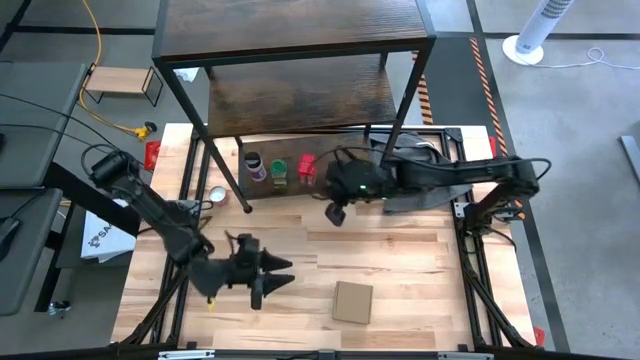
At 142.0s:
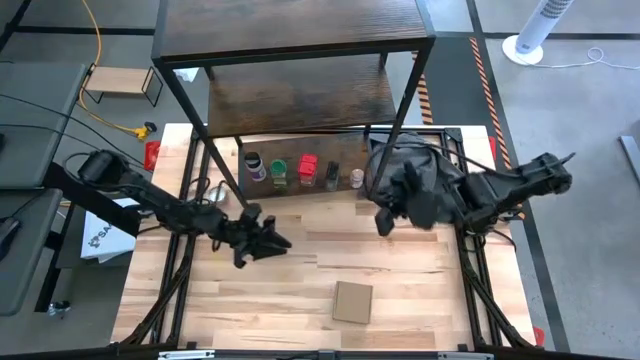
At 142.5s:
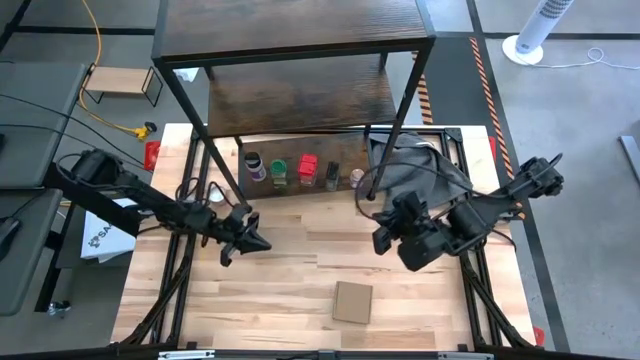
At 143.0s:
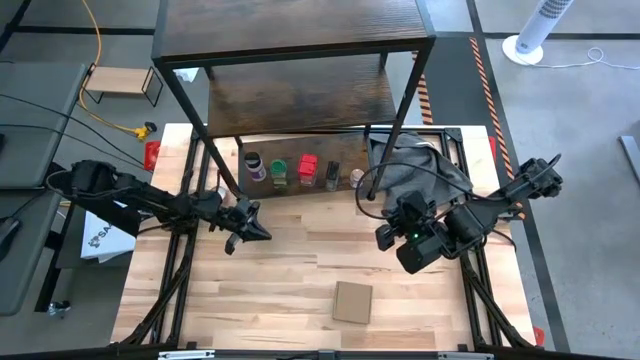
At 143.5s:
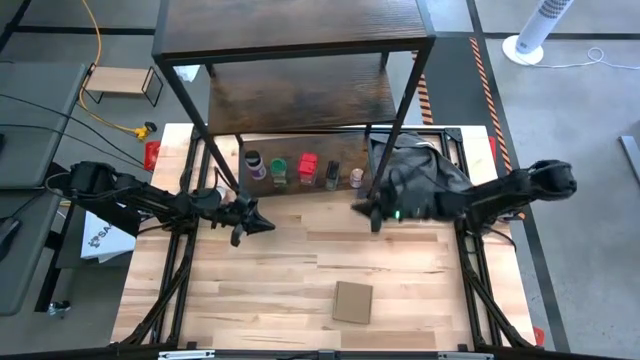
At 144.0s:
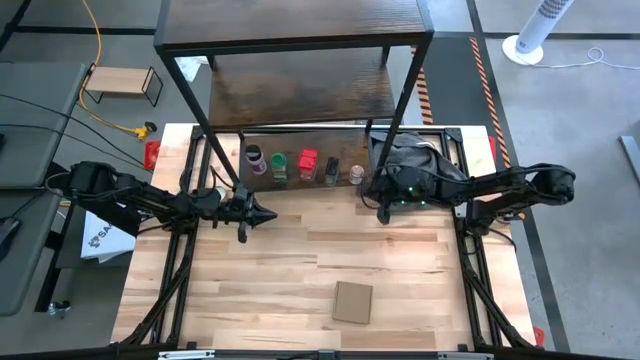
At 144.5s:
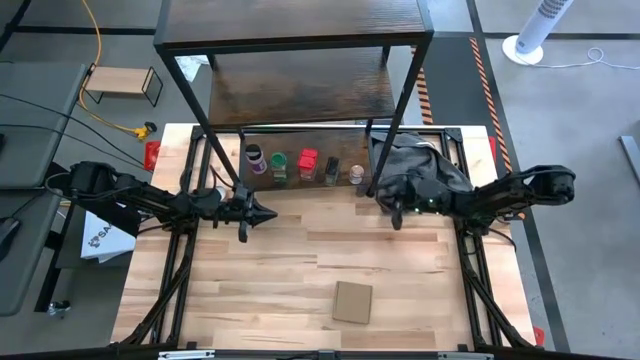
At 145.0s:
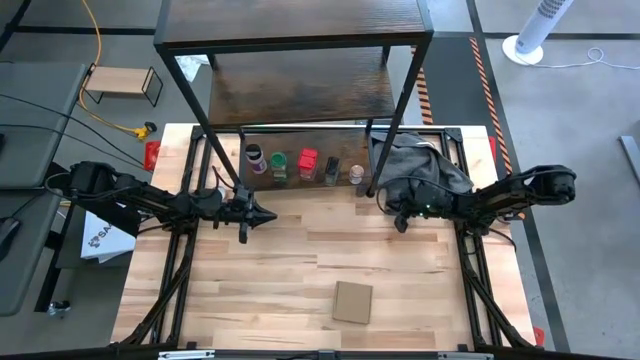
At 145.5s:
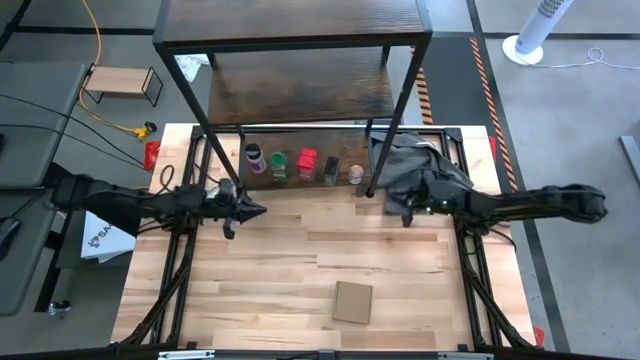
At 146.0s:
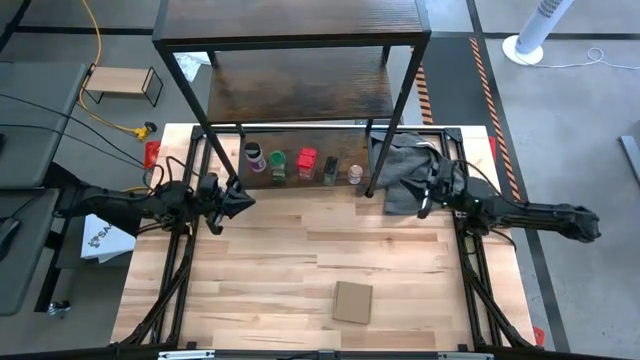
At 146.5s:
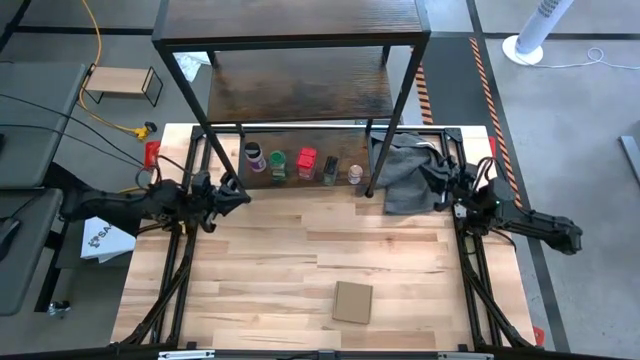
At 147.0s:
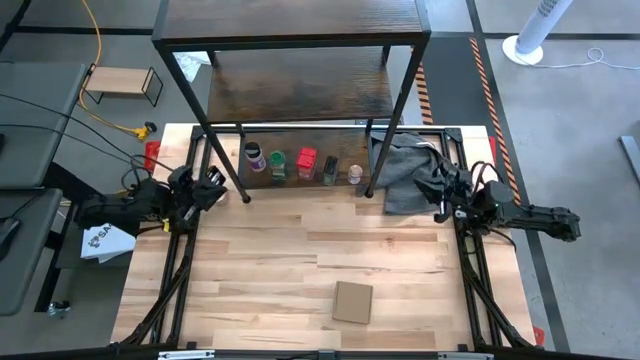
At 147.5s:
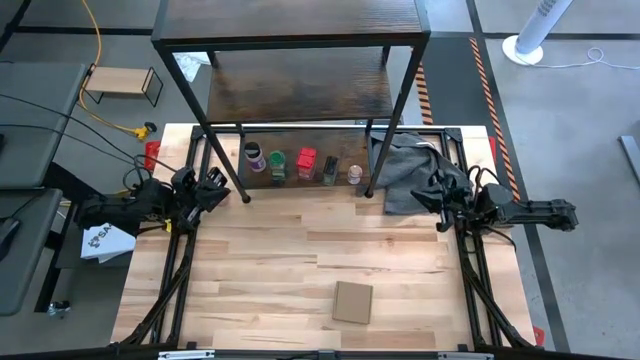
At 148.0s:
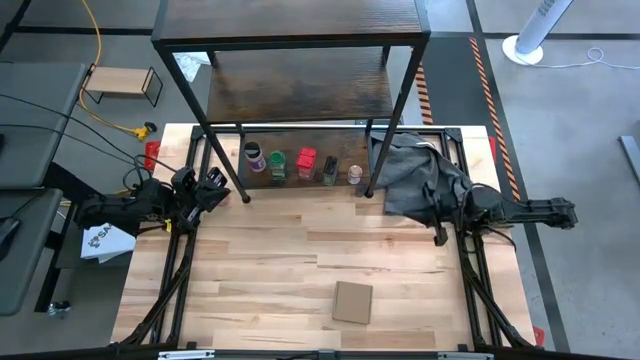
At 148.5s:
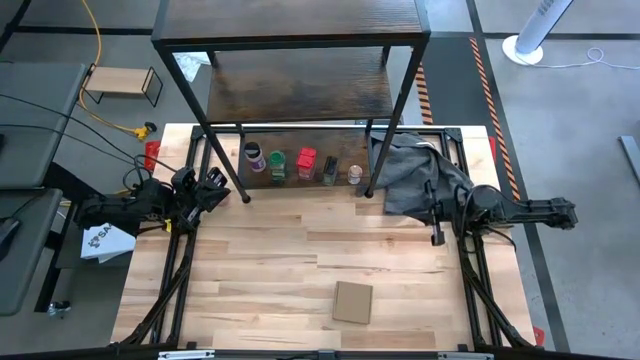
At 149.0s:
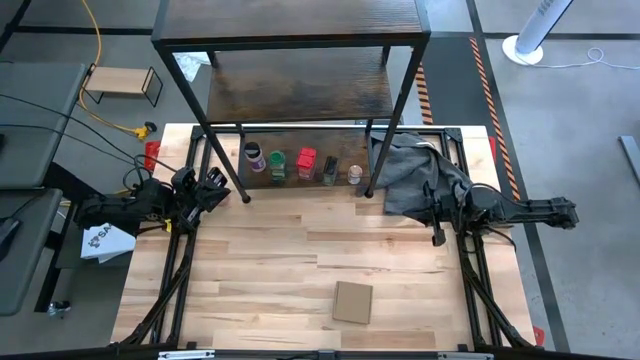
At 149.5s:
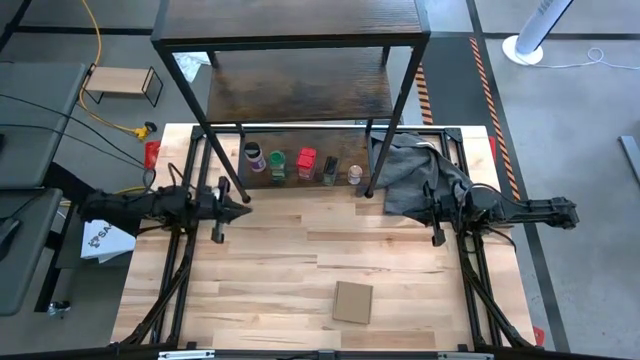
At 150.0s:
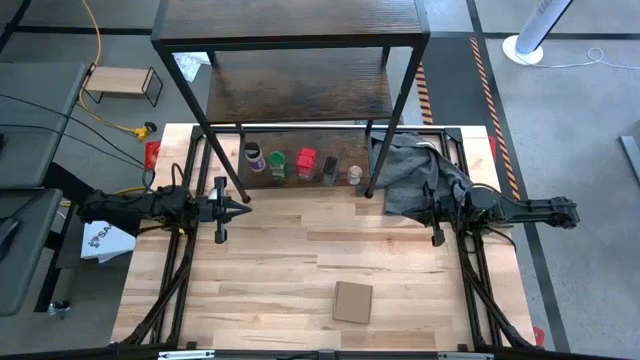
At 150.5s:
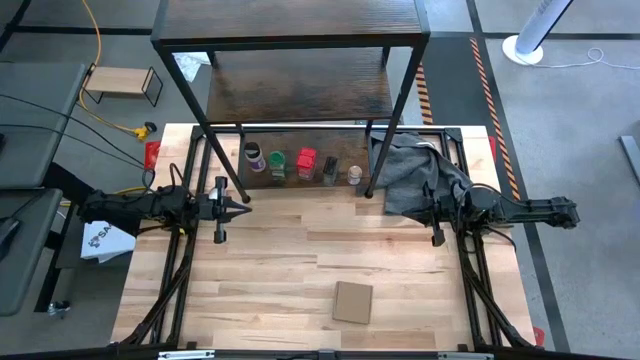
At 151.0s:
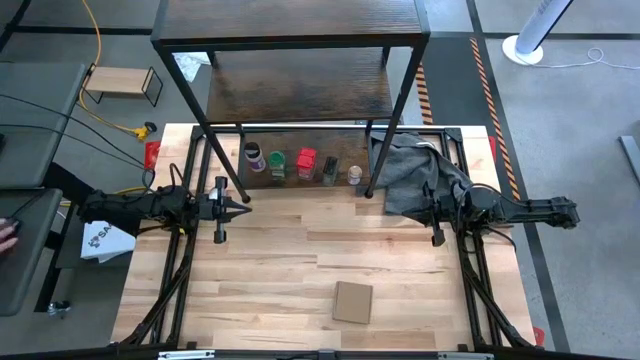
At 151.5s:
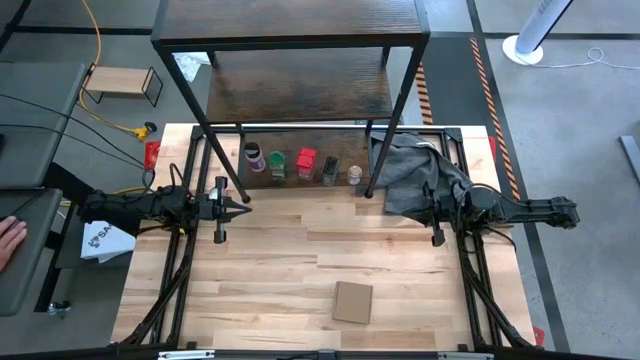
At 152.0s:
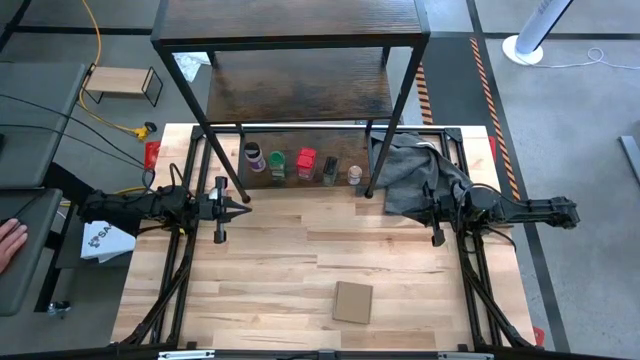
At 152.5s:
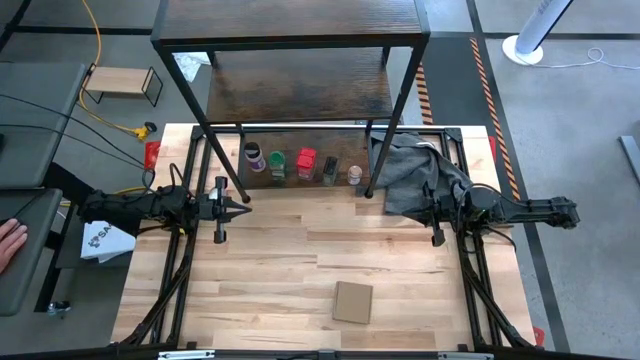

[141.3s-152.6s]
Task: Shelf spices
Return to Home Position

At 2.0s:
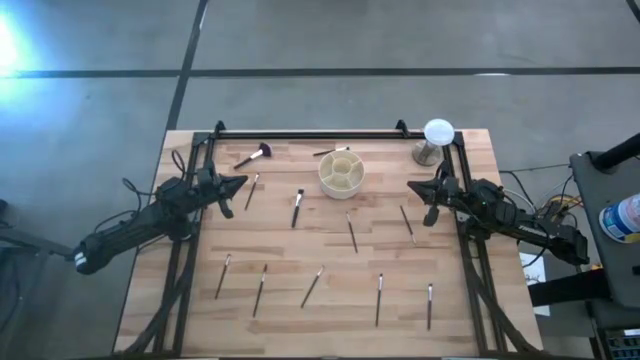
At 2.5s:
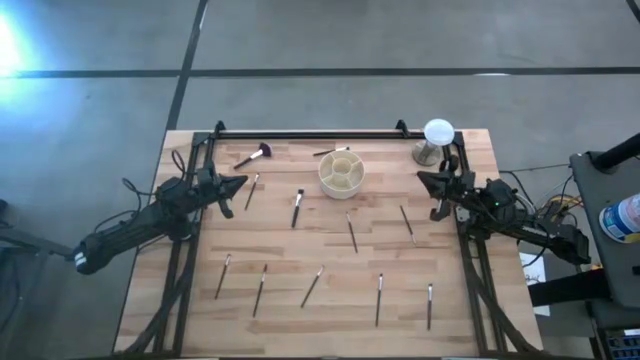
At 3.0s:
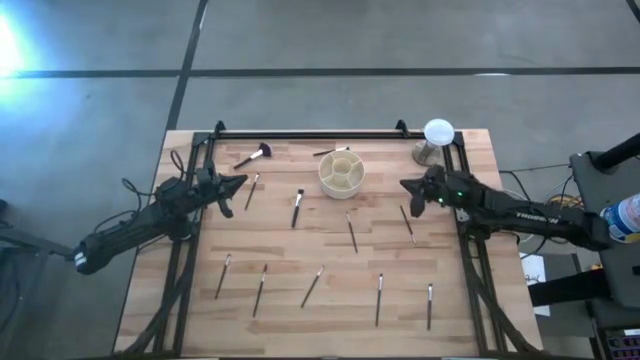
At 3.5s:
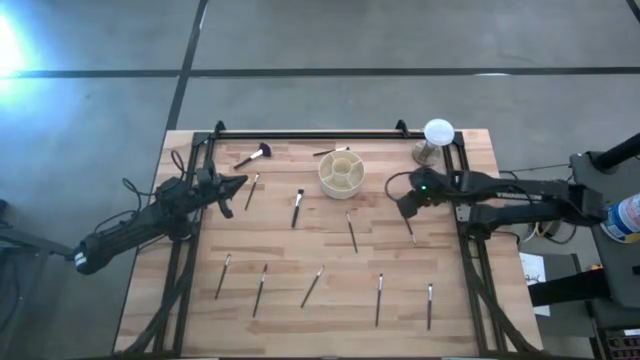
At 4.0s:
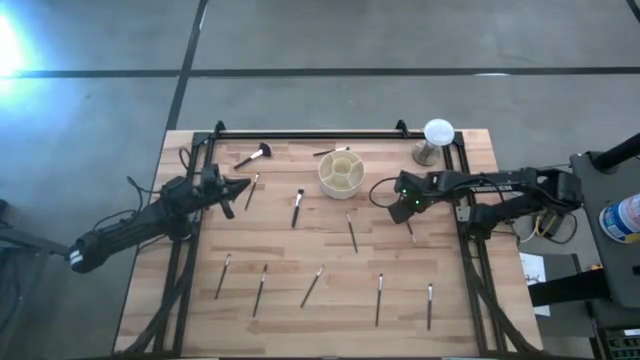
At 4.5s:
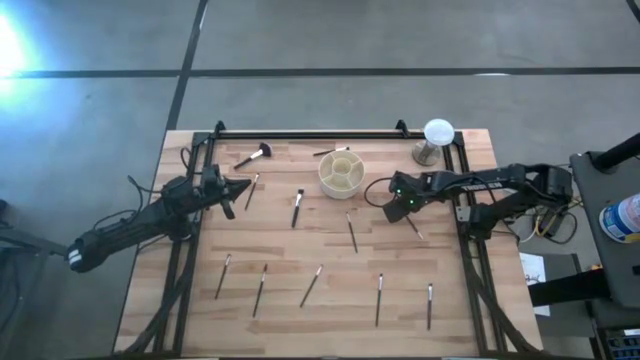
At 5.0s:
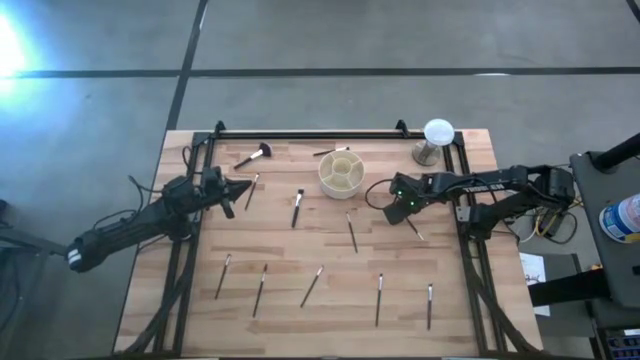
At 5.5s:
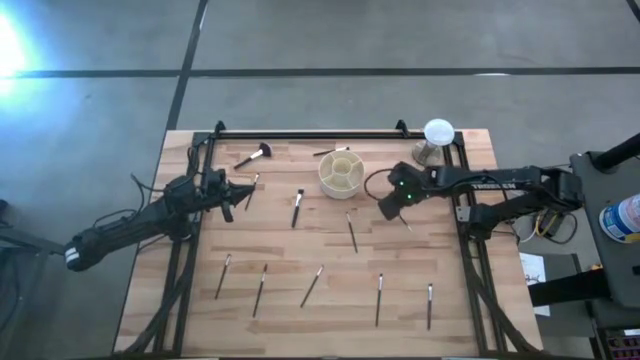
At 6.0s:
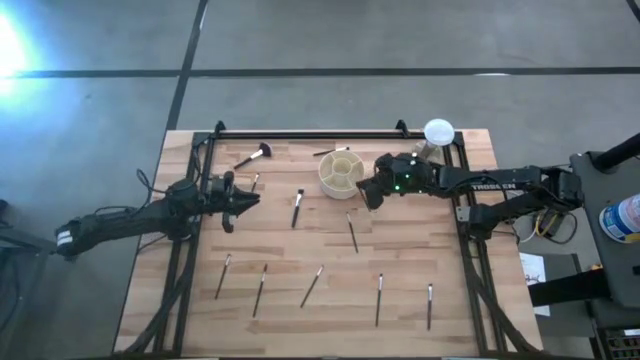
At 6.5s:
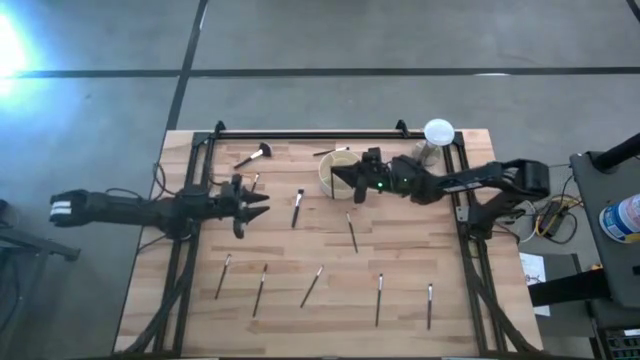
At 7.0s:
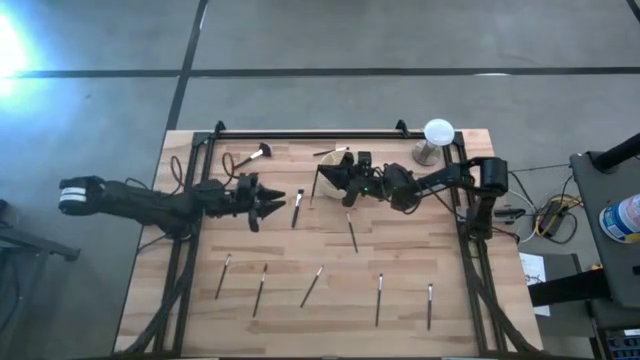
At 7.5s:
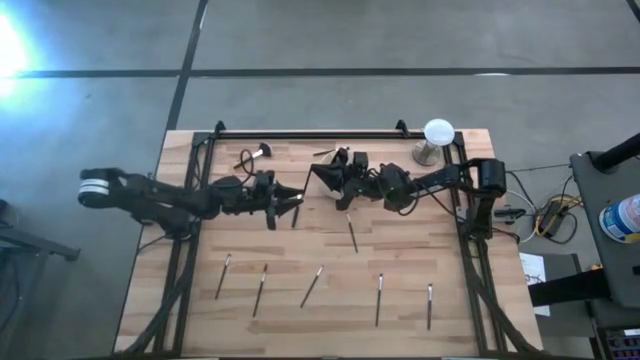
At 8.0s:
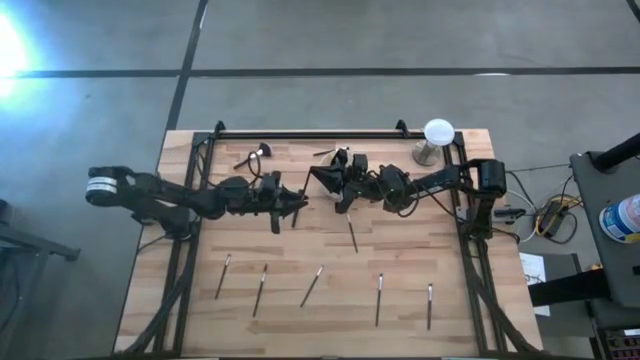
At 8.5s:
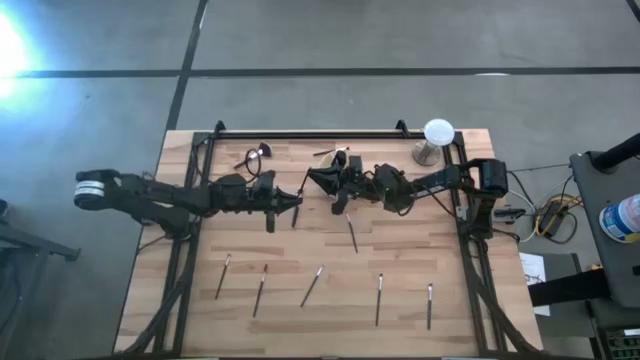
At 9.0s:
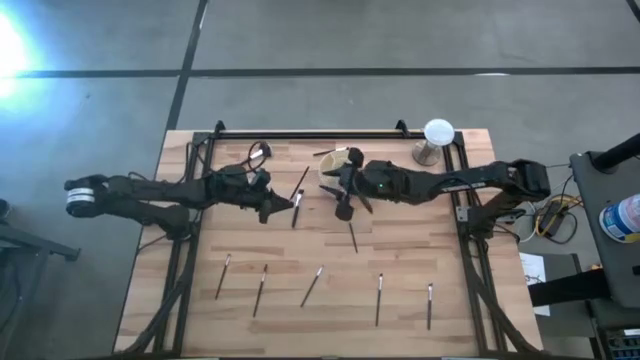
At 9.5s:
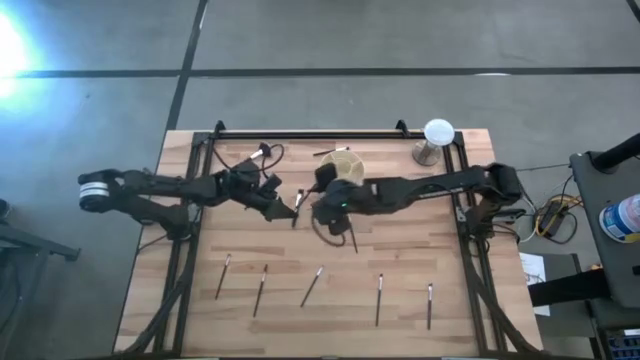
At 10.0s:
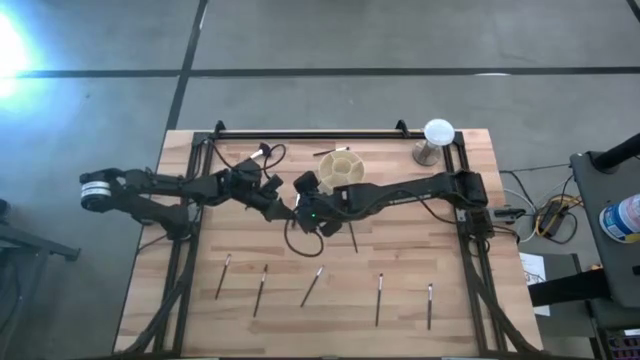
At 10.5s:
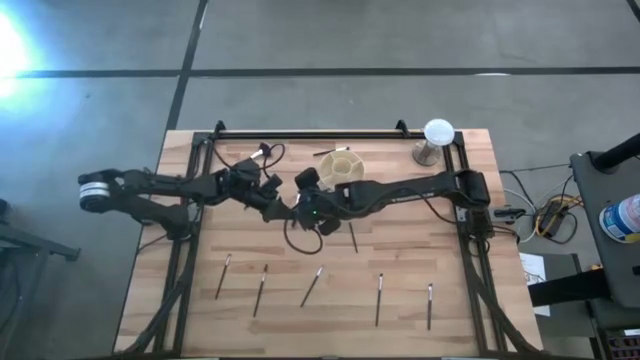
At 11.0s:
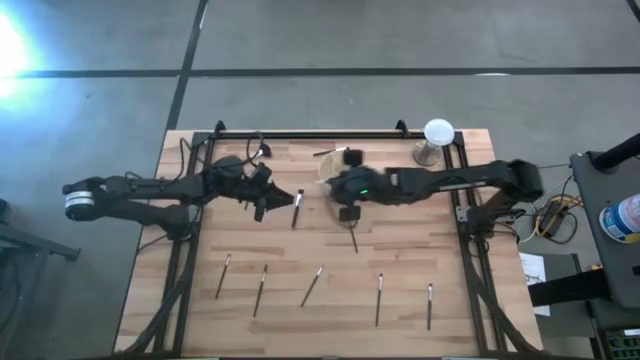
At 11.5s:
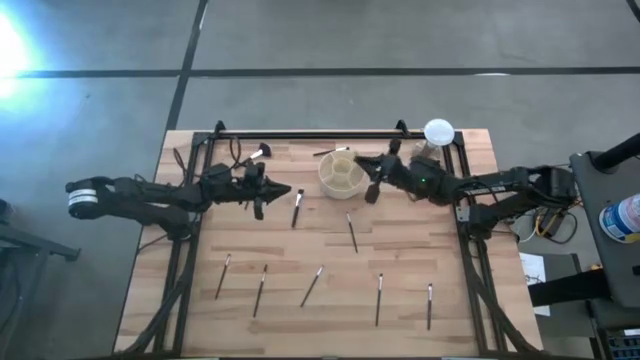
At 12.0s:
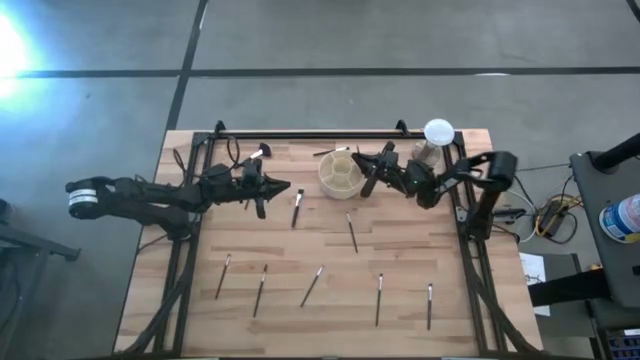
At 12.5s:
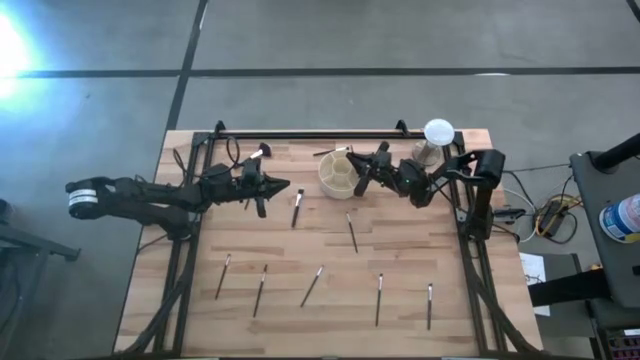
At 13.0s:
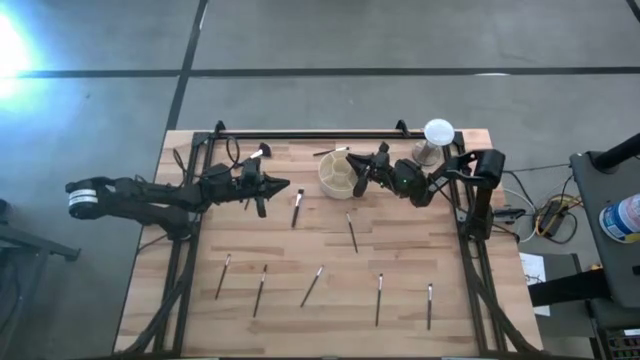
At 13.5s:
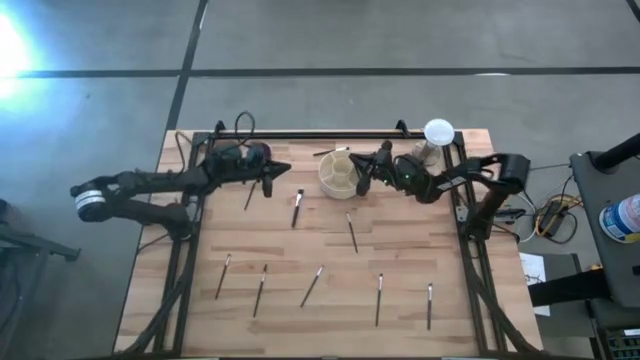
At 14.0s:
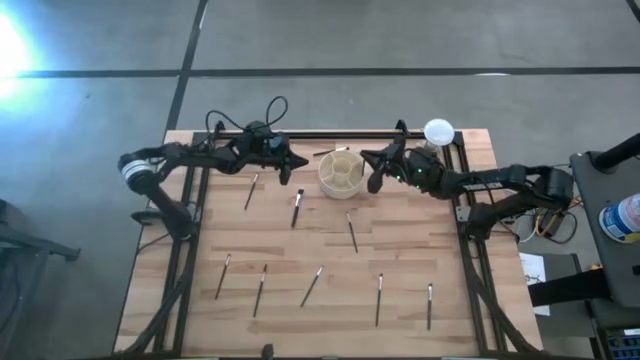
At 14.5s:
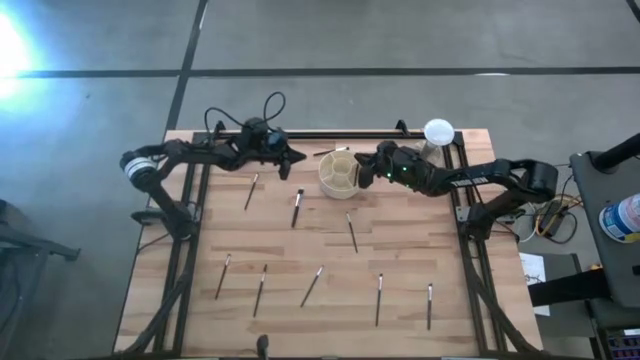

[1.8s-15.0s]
Task: Put items in baskets/containers
Put the top black silver liner brush into the pen organizer
